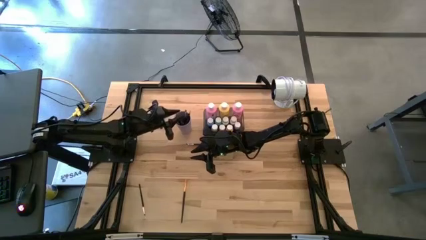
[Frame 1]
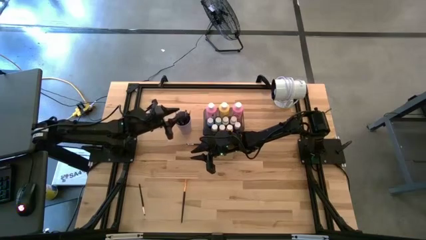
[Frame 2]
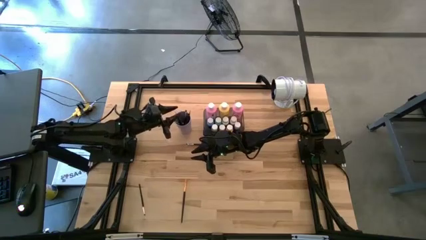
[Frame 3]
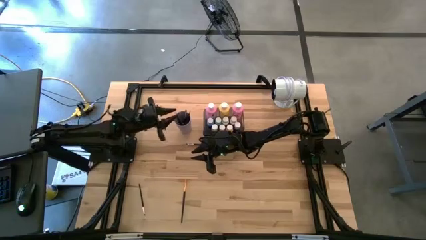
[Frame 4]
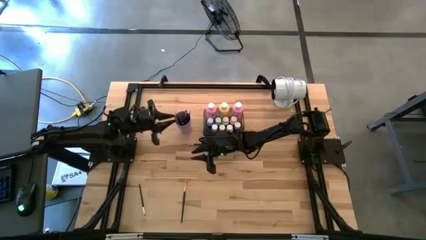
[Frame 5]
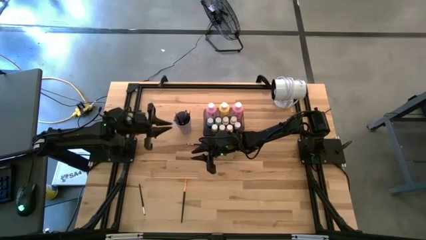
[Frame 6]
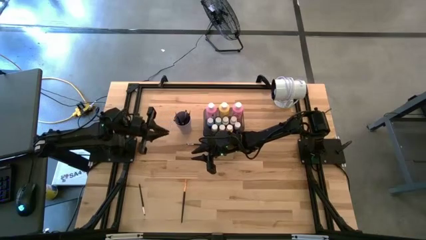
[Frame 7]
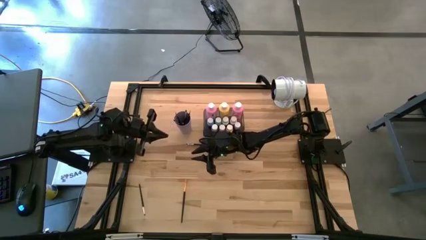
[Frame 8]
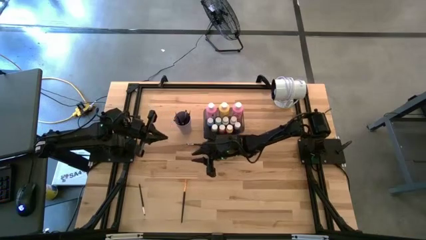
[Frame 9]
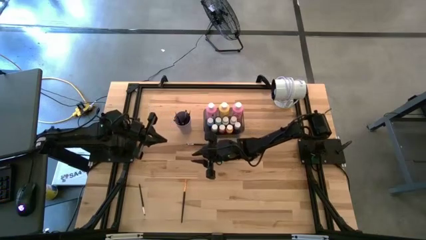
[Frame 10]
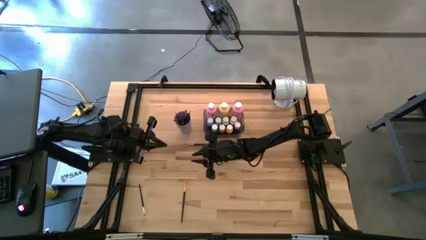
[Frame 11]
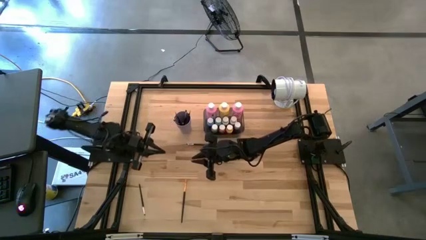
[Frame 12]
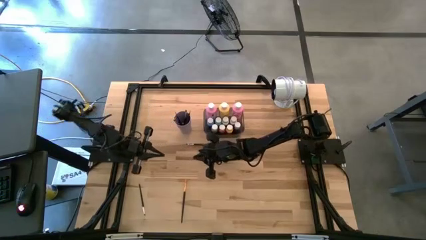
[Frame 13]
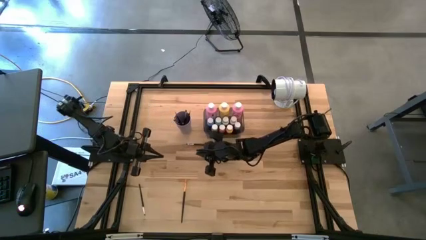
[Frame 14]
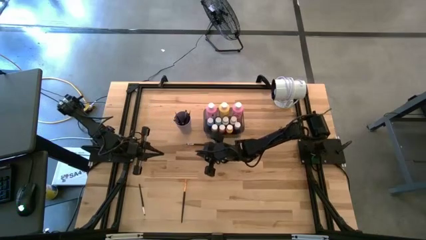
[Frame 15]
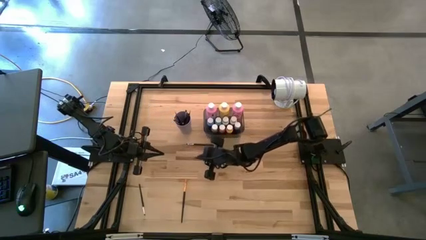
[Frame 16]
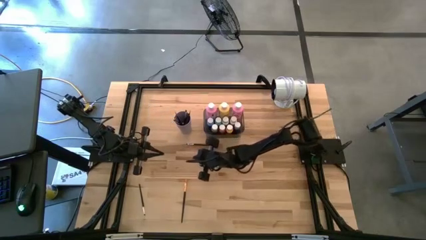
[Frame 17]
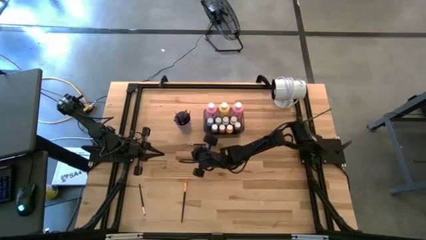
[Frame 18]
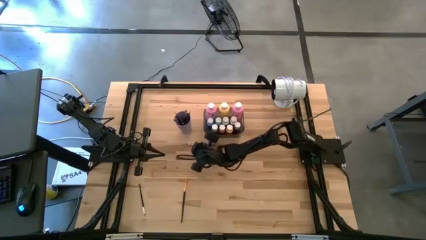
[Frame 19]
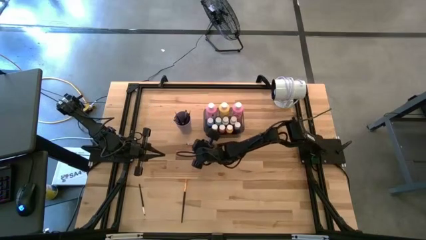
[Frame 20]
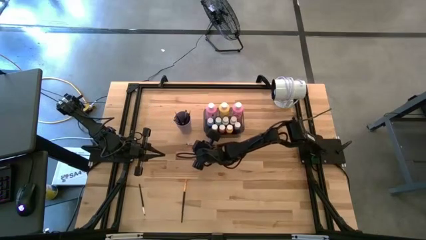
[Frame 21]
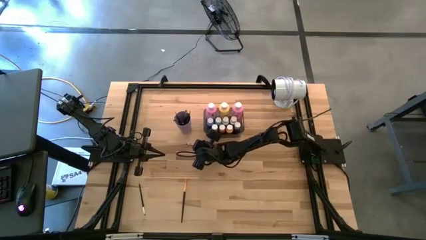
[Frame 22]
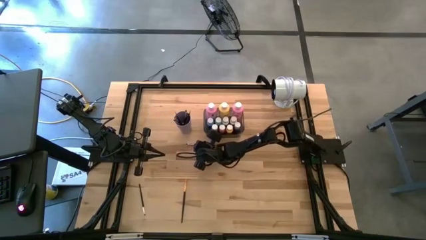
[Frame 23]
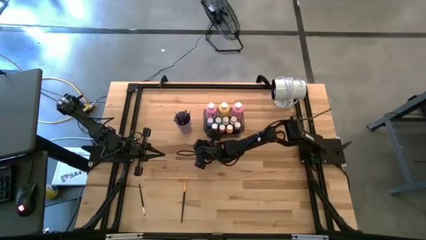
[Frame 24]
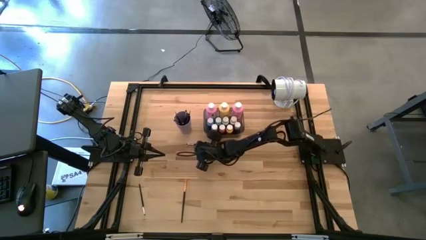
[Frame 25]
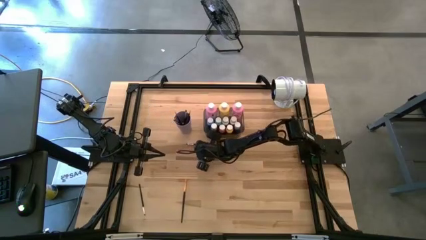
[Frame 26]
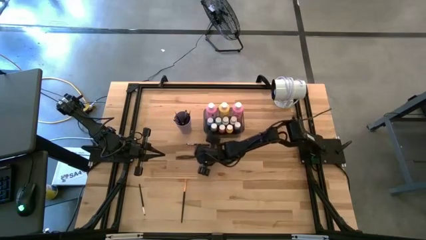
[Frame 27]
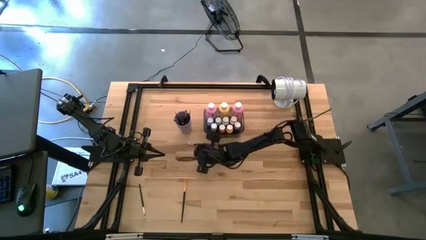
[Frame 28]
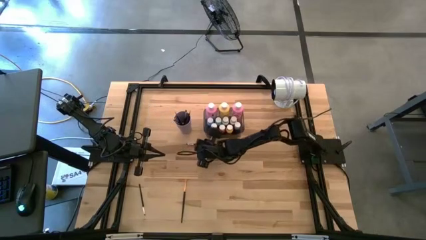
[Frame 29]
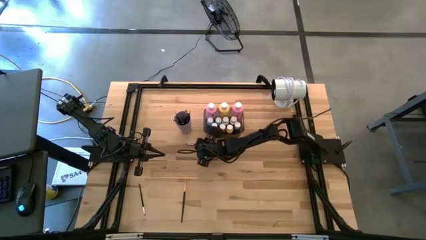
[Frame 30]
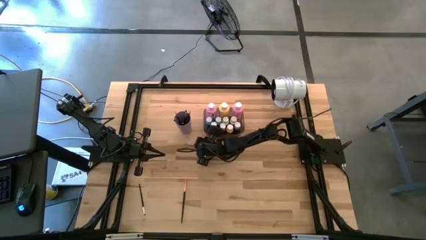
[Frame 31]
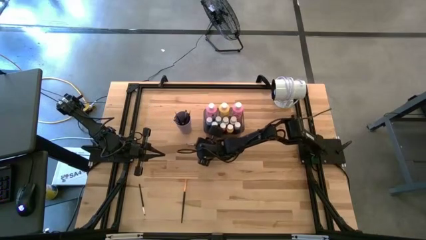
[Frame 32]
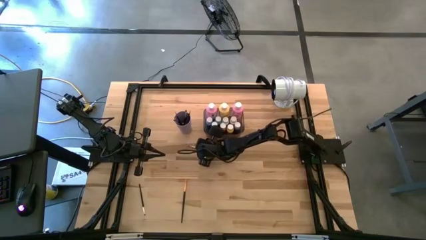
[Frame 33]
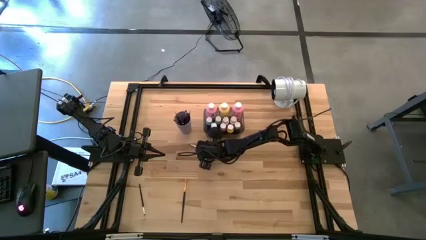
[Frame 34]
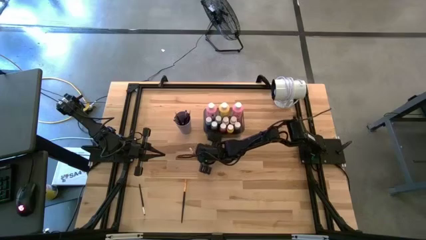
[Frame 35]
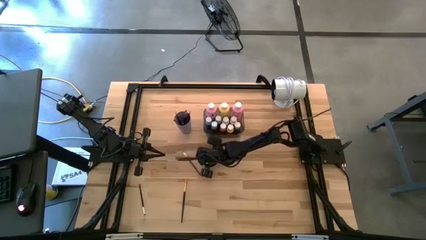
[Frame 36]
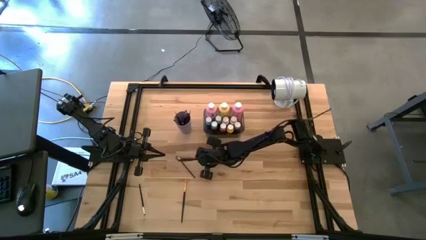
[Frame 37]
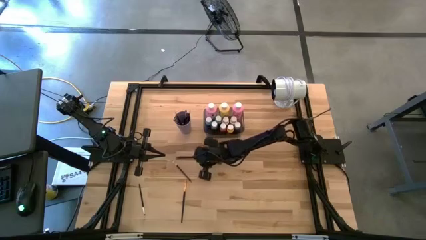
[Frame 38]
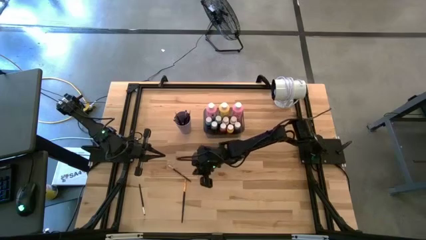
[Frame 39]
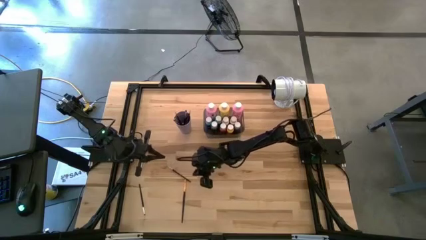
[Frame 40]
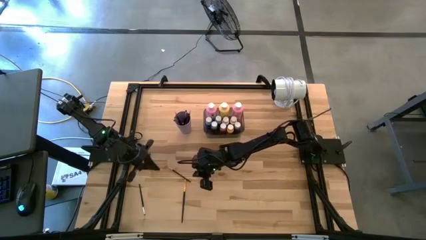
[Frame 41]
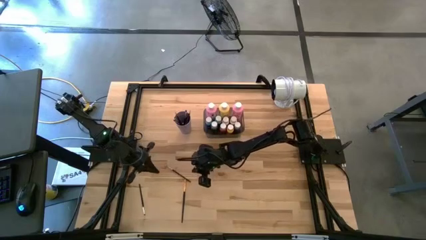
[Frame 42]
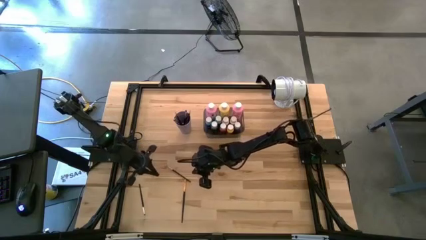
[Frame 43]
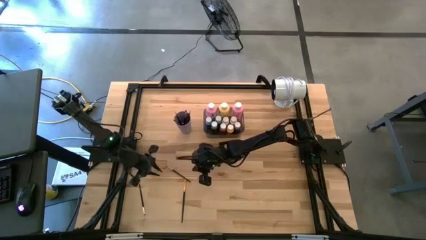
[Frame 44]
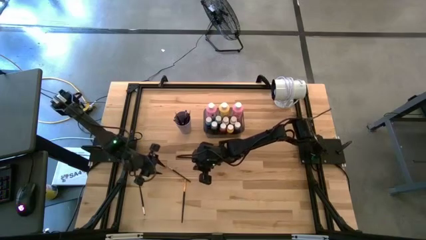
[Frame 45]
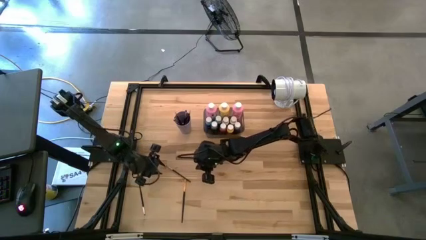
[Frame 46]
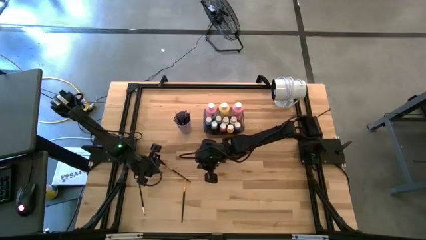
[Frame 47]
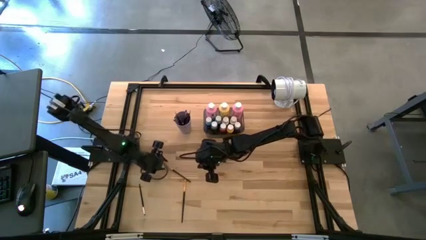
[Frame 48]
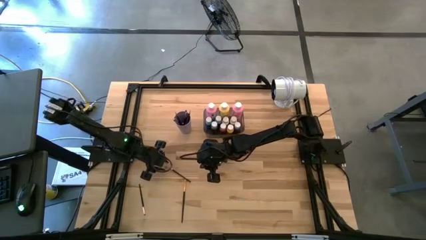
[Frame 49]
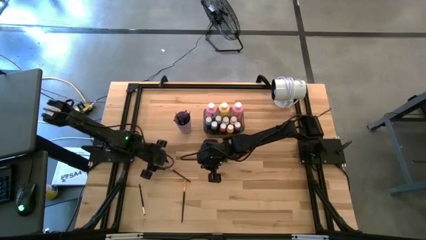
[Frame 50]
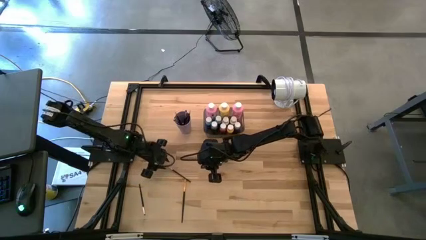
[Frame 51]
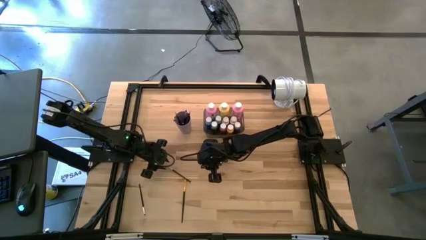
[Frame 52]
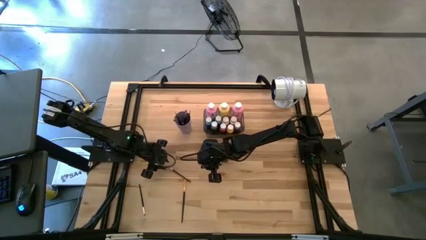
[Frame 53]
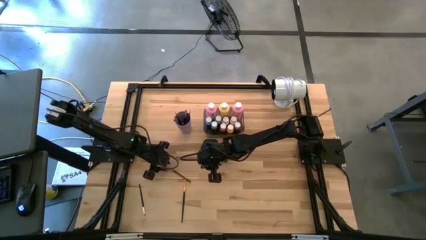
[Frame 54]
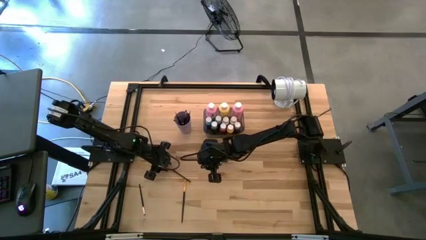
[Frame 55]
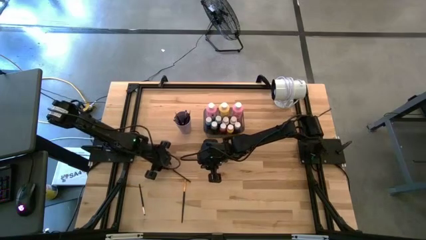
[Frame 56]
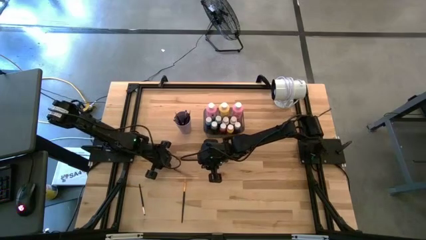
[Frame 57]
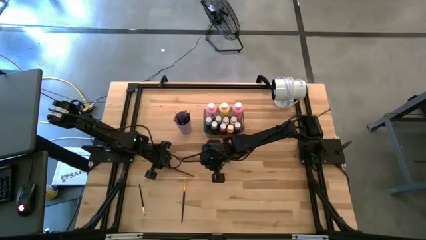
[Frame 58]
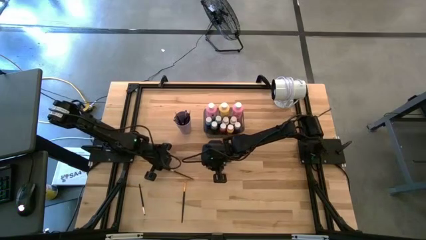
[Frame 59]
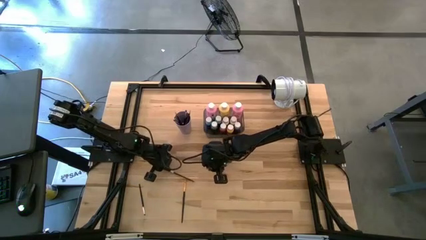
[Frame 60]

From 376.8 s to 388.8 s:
Task: Pick & Place Paint Supplies
Put the silver paint brush into the purple cup

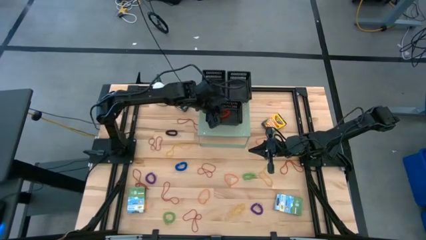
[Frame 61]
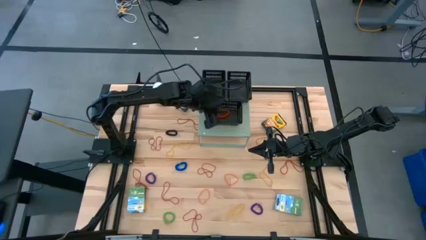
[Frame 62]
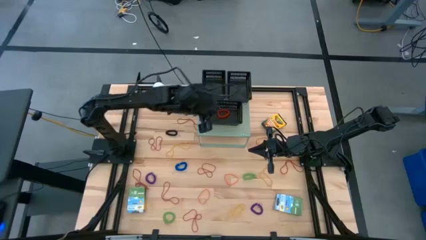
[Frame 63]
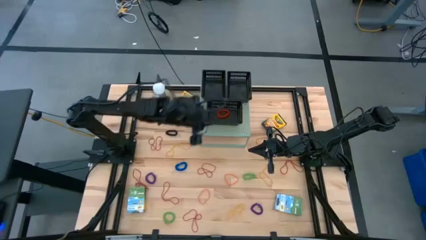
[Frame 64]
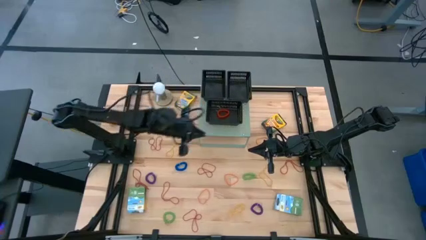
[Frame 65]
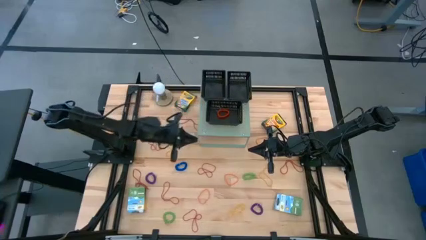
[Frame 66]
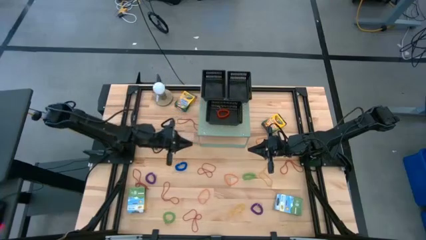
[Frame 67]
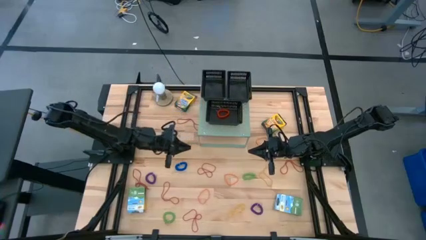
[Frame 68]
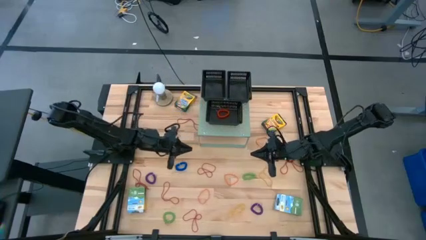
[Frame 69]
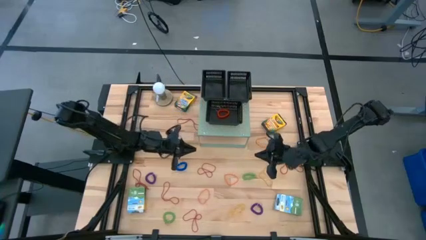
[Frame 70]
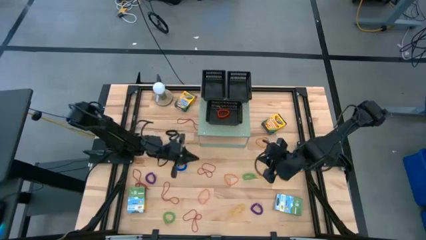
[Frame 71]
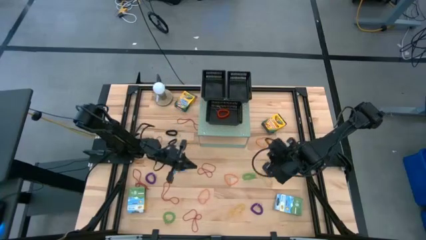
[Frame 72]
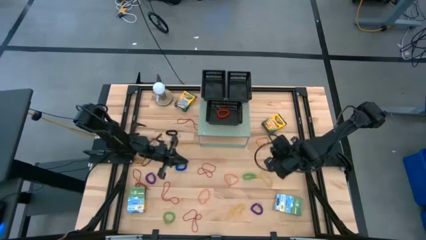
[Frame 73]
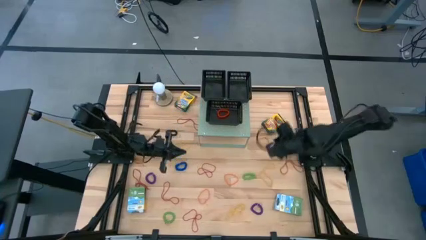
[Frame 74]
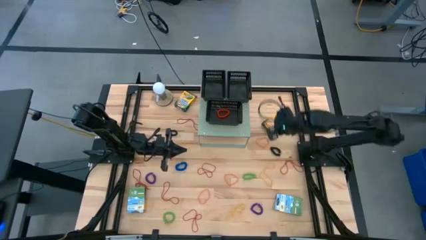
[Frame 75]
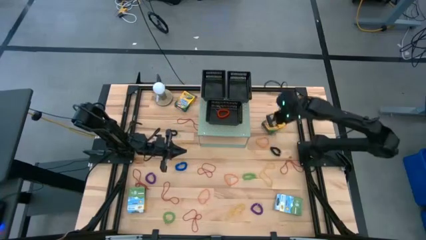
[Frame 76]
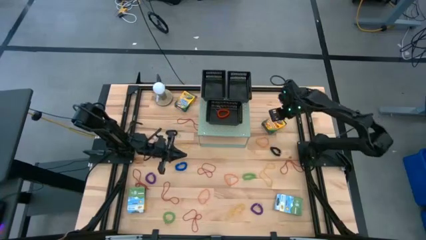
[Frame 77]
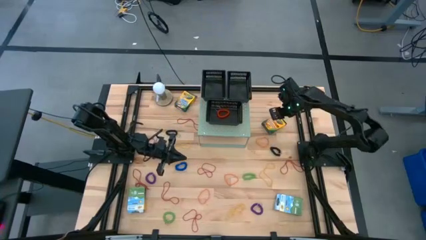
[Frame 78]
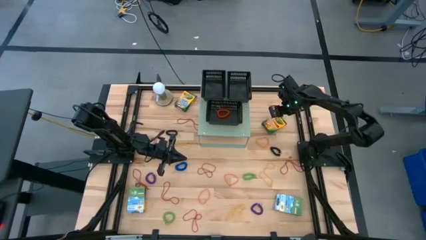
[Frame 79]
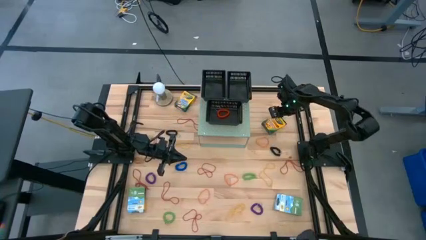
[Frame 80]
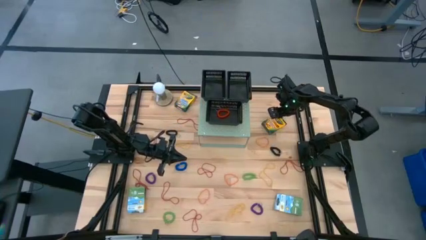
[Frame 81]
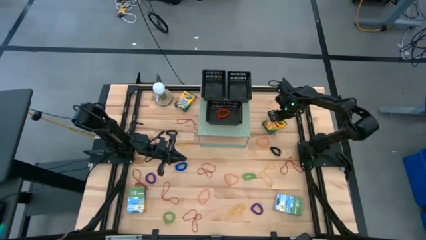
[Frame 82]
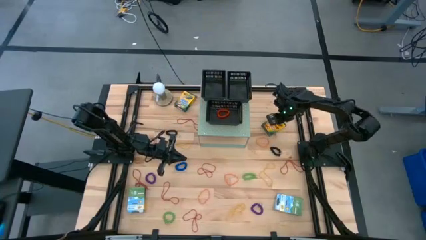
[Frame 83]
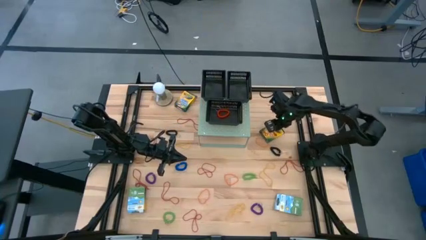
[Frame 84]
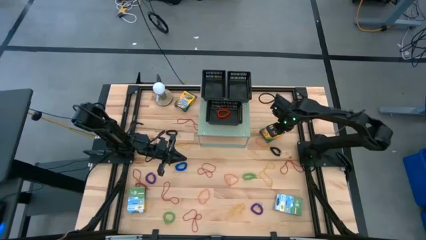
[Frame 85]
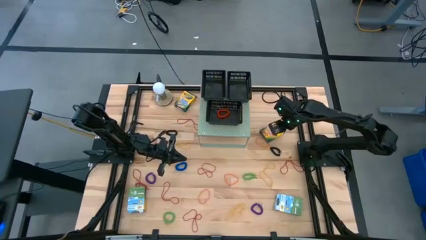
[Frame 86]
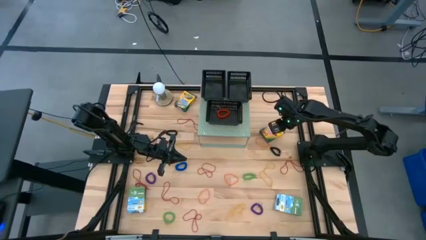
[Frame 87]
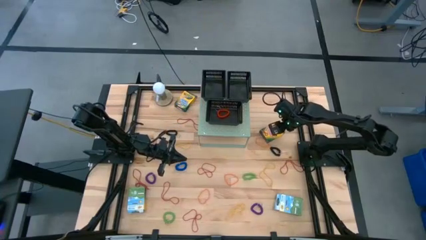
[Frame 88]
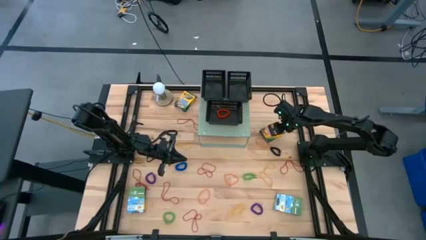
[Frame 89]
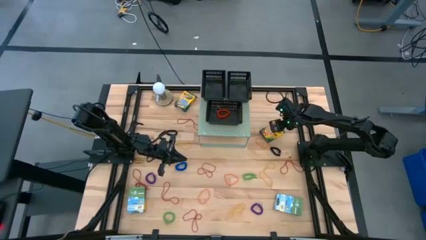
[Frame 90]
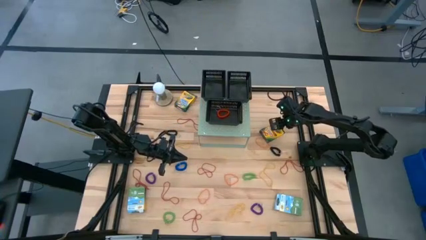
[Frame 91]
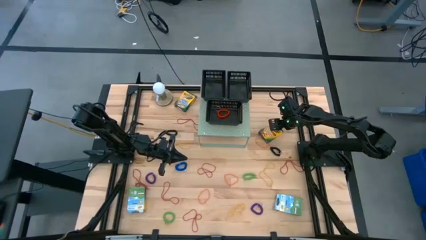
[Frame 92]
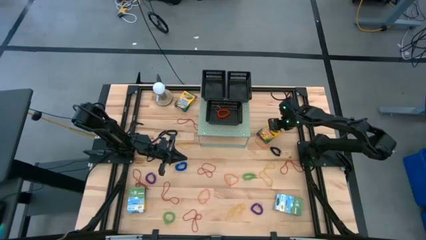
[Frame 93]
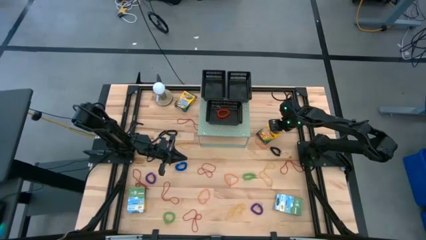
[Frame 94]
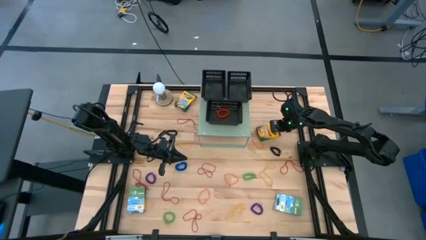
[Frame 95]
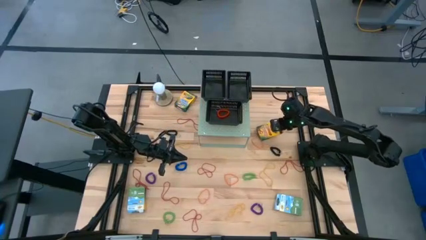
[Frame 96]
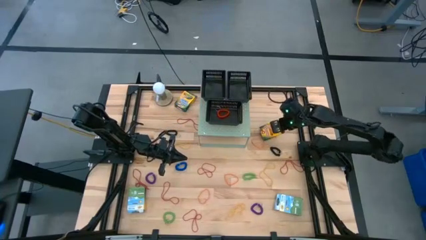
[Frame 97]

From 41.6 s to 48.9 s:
Task: Pick & Place Office Desk Supplies
Put the yellow crayon box into the top left black bin on the shelf
